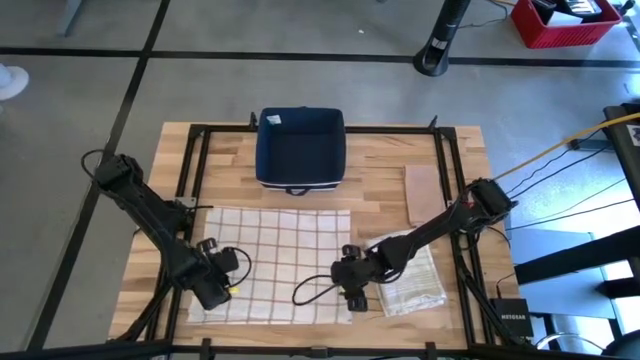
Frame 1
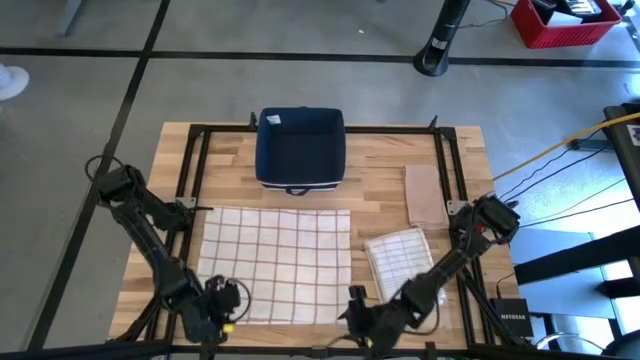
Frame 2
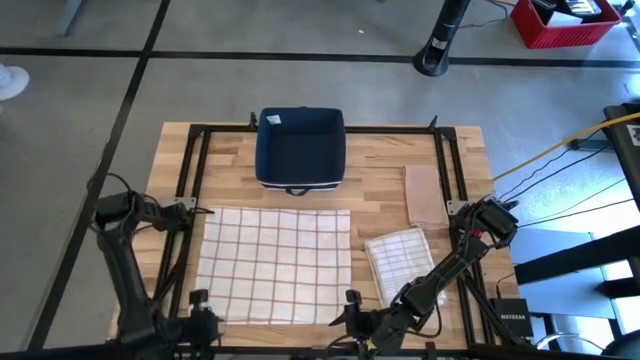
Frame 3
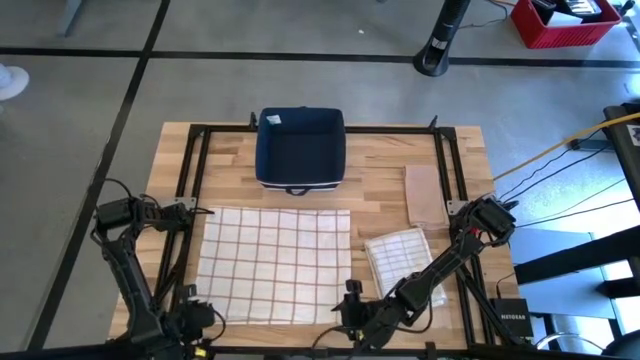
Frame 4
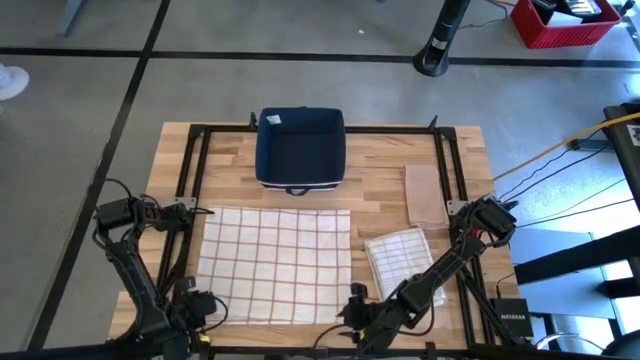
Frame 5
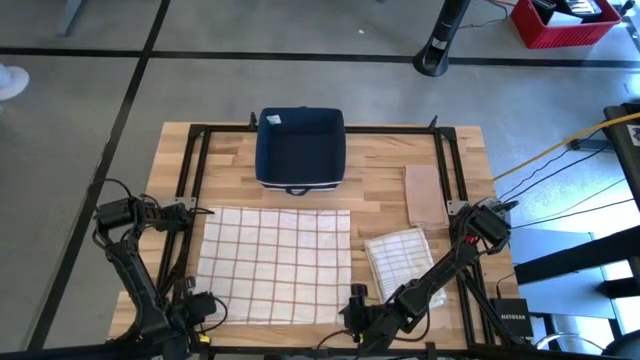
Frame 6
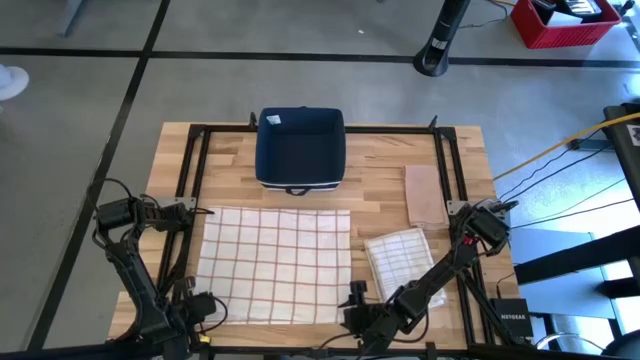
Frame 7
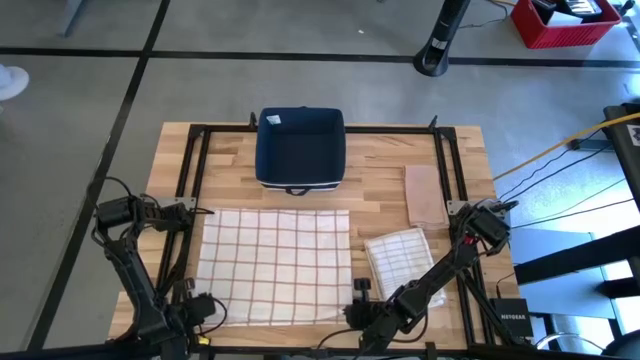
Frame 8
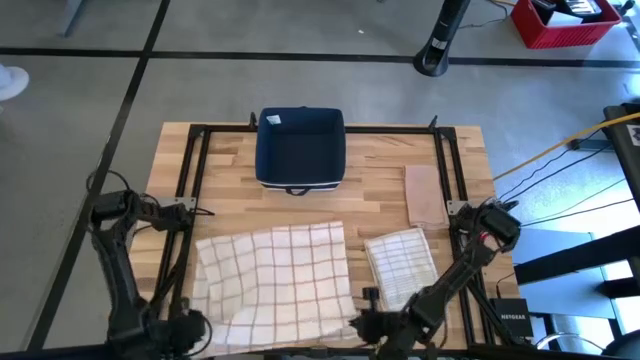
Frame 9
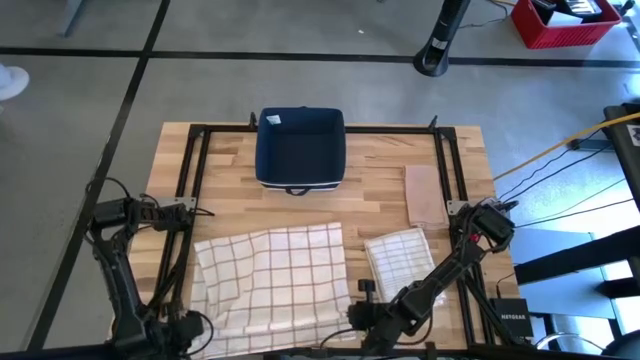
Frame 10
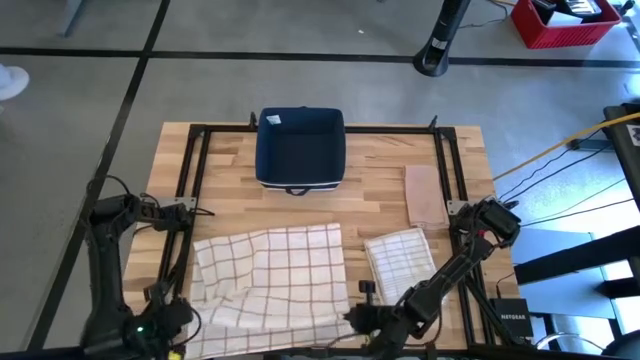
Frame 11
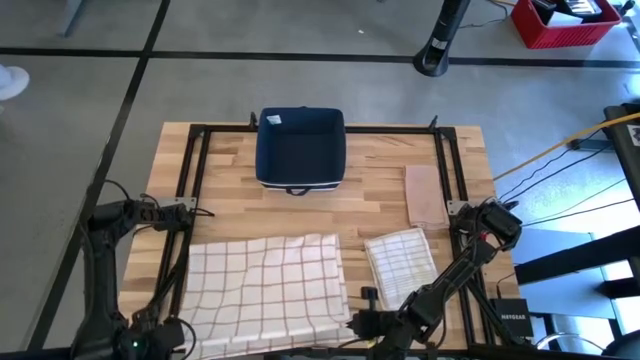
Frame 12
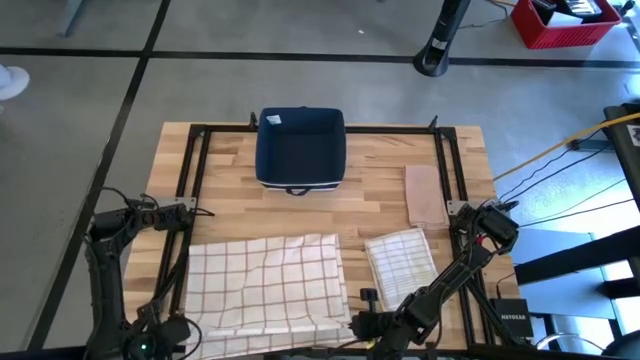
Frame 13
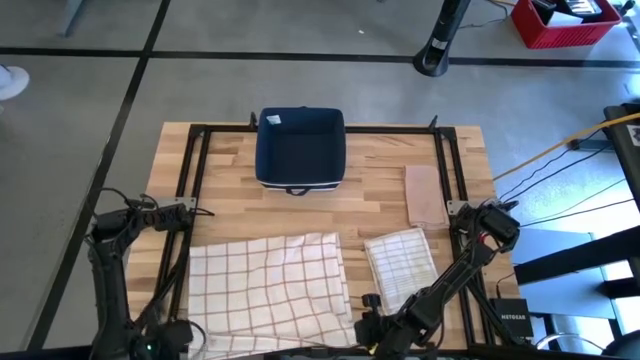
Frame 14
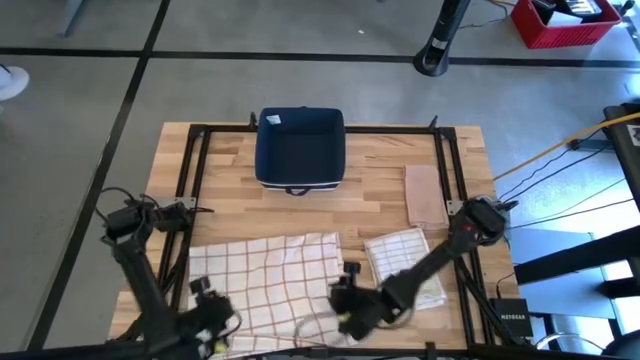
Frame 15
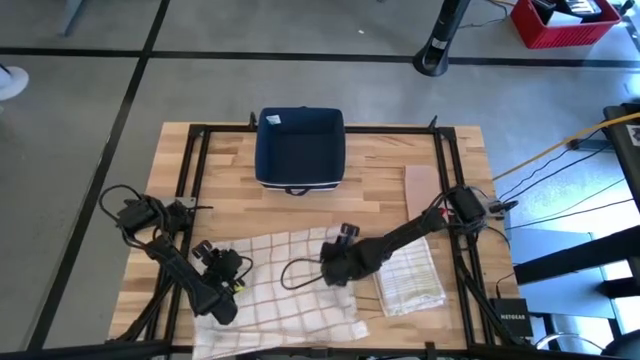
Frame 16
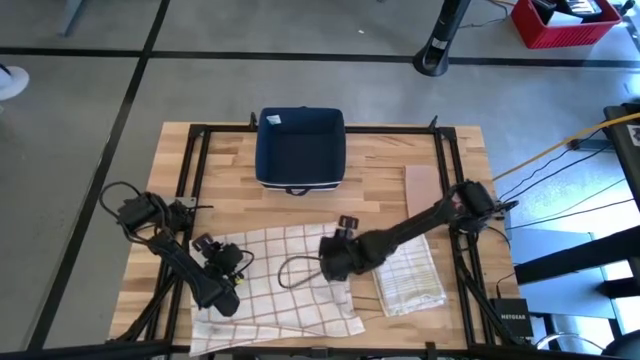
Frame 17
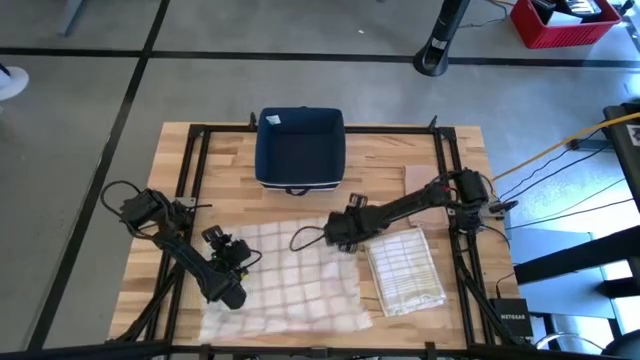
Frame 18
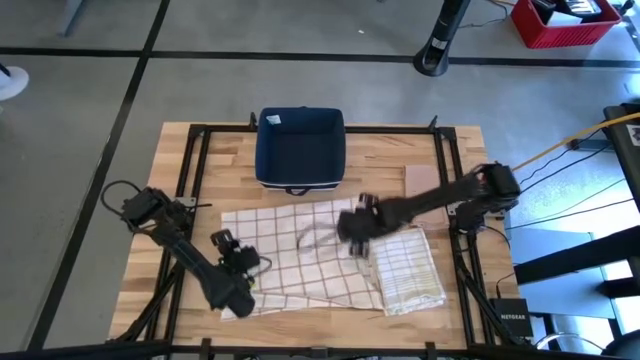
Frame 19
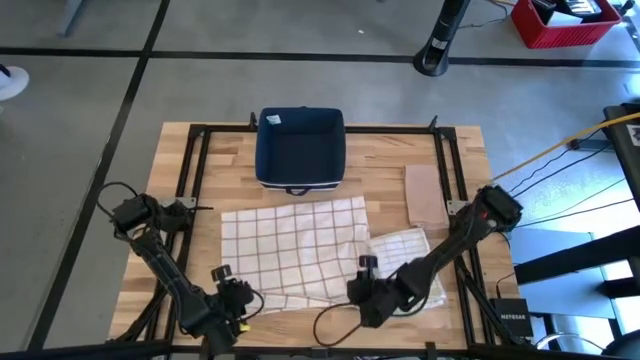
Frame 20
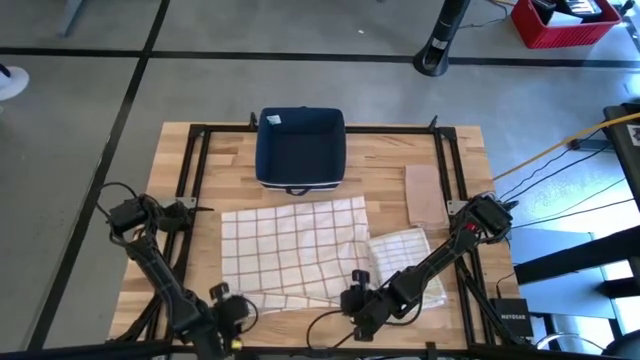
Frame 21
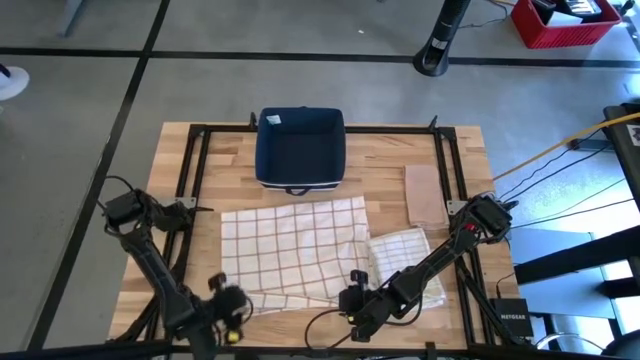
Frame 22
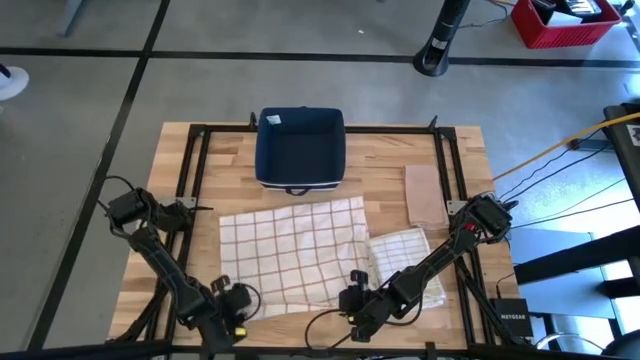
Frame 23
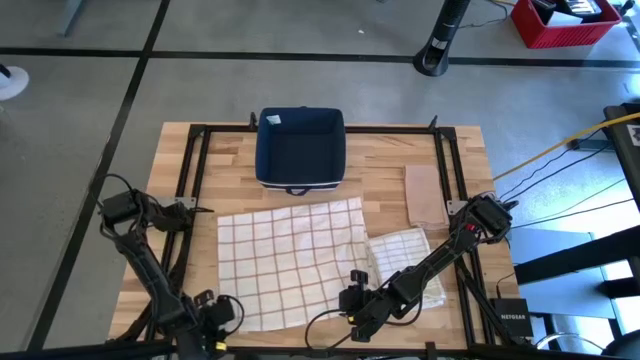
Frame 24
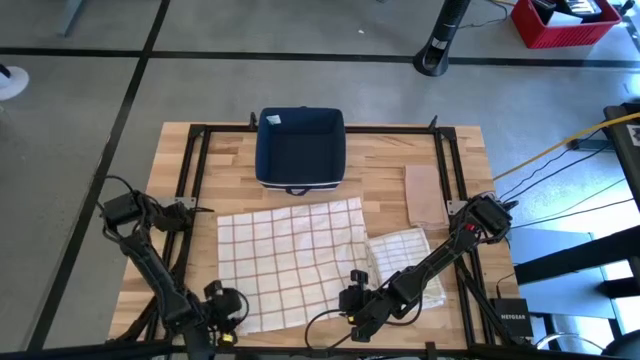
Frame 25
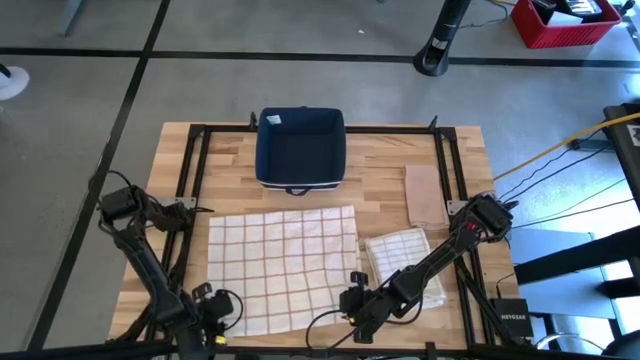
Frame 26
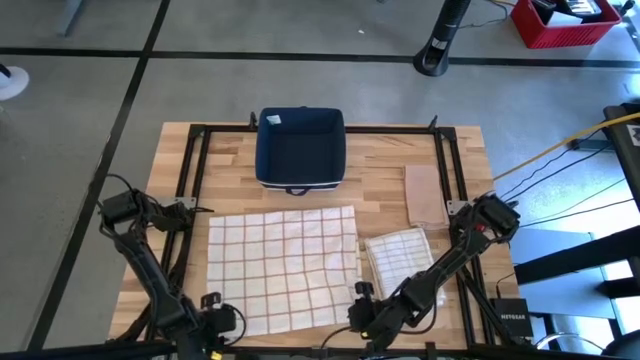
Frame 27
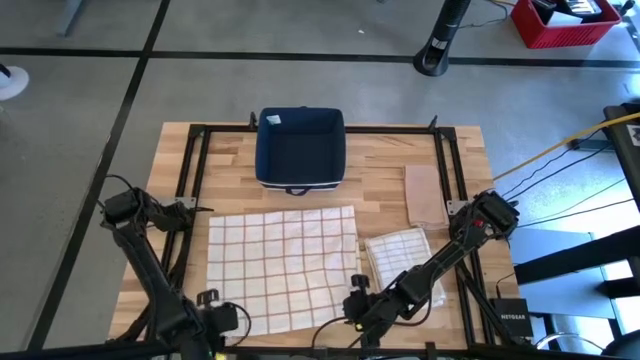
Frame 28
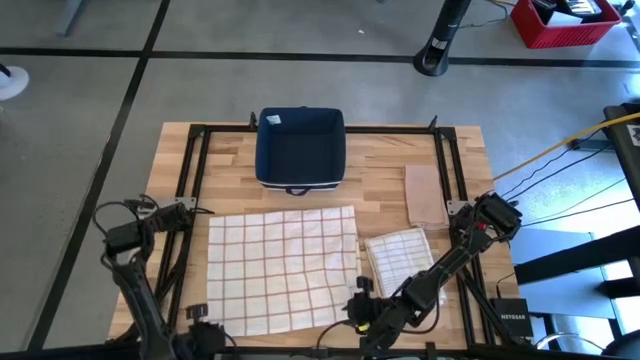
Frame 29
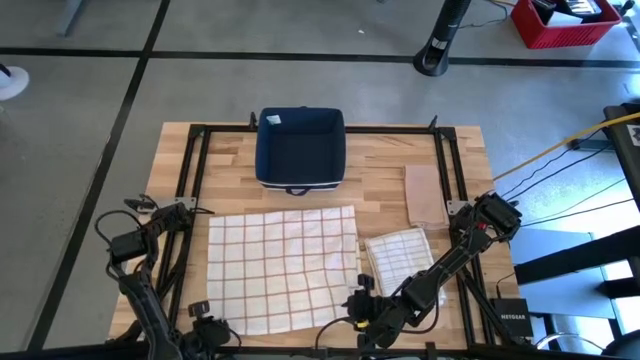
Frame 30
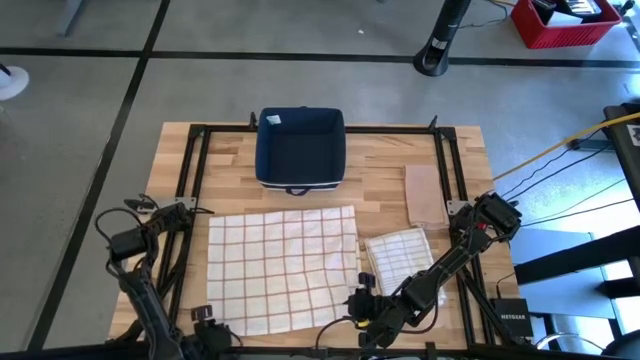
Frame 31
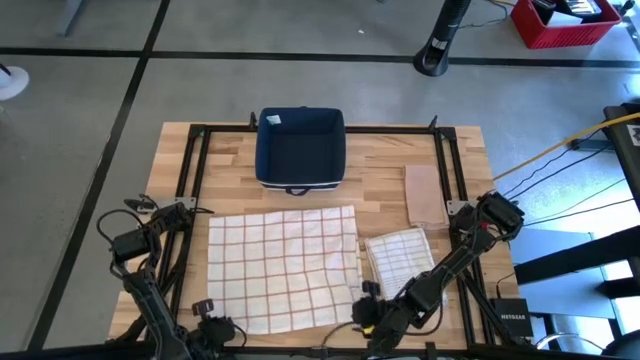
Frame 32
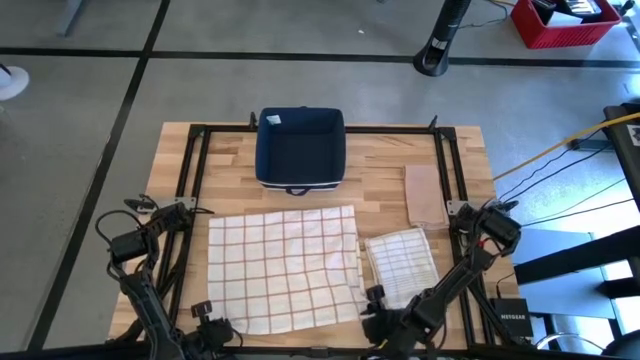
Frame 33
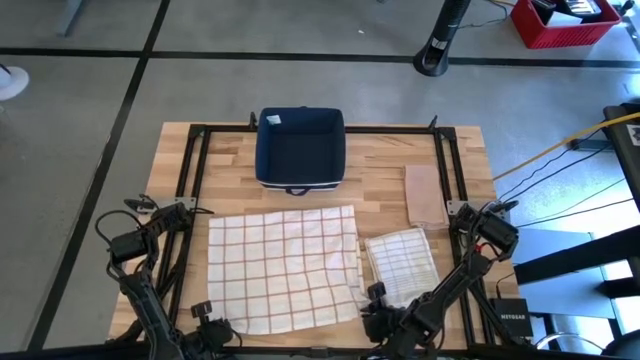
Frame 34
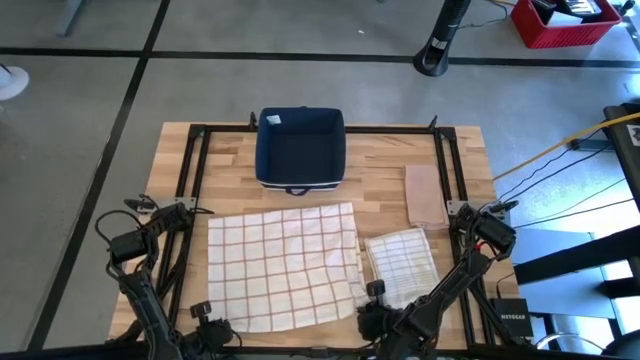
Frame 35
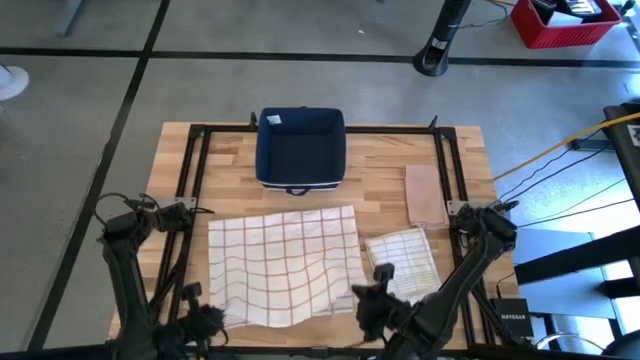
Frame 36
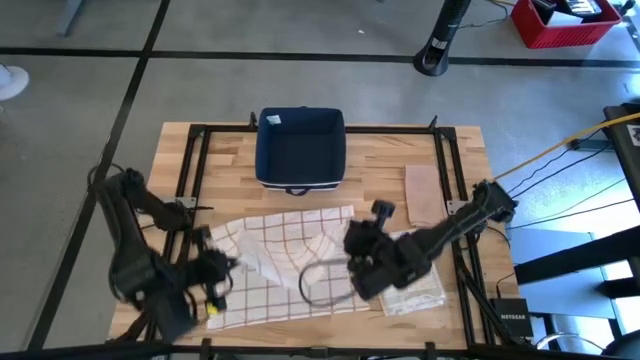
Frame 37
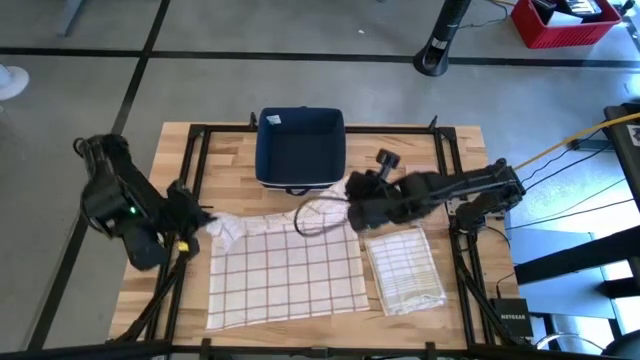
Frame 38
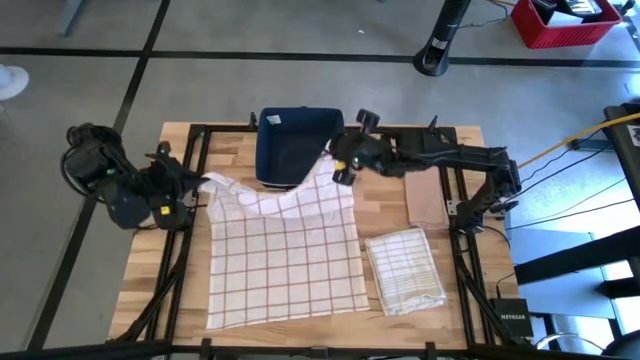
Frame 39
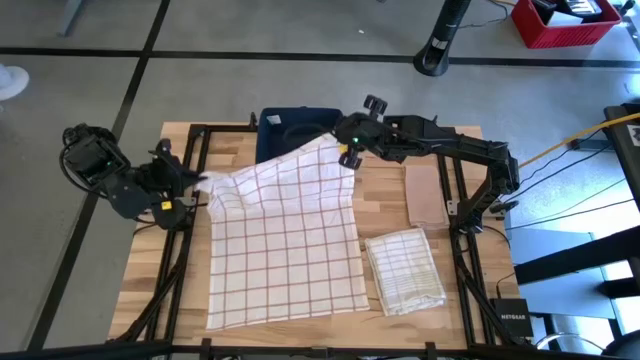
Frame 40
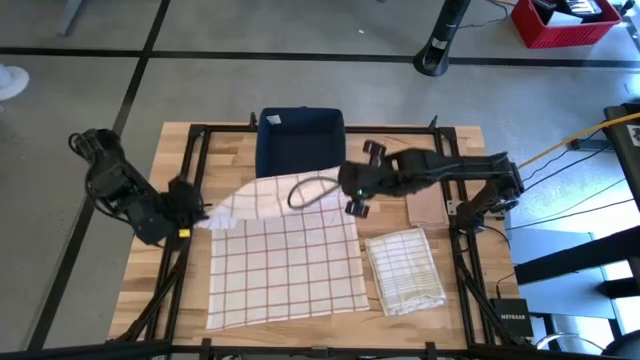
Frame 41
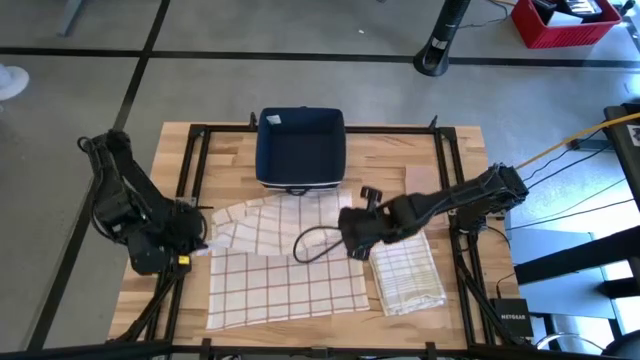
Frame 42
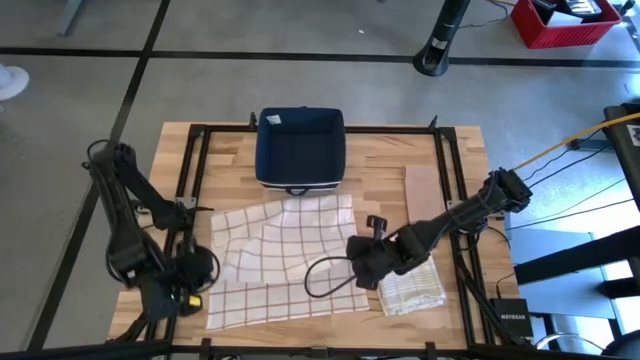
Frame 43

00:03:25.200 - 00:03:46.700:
Task: Fold towel
Fold the white with brown pattern towel on the table
